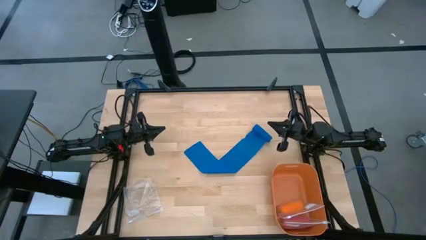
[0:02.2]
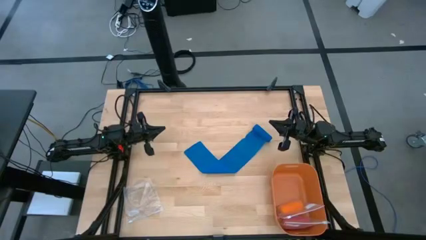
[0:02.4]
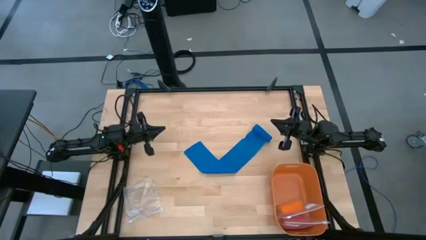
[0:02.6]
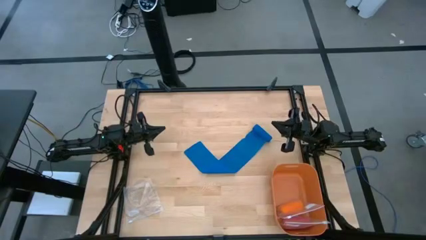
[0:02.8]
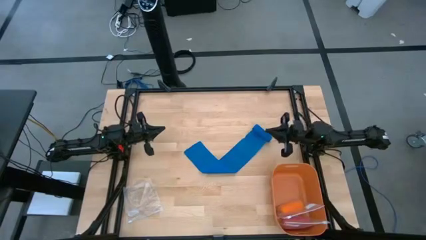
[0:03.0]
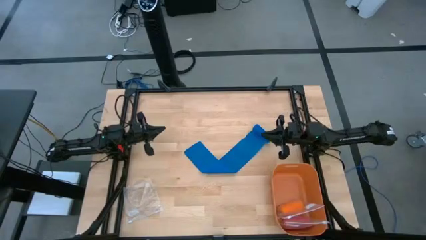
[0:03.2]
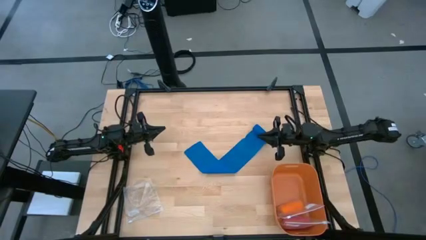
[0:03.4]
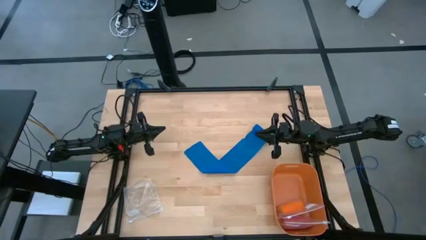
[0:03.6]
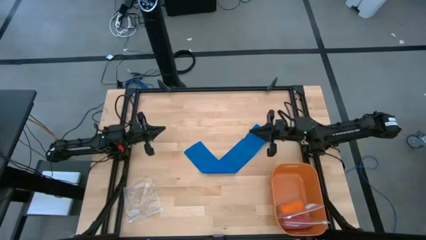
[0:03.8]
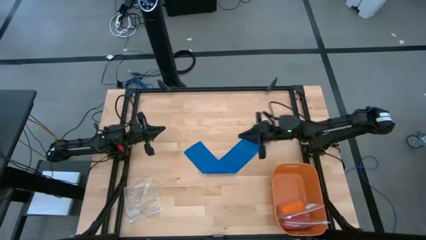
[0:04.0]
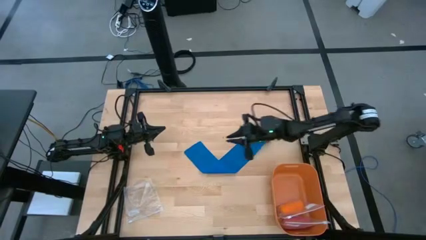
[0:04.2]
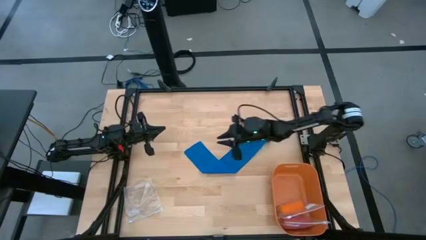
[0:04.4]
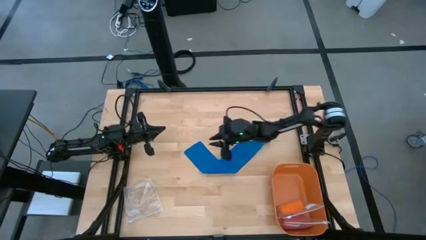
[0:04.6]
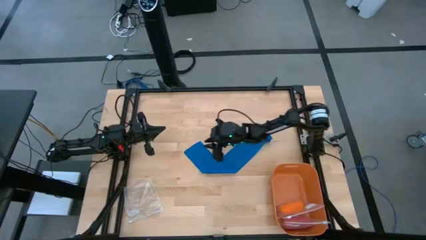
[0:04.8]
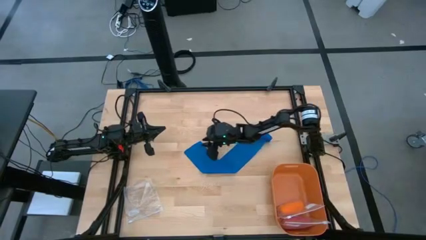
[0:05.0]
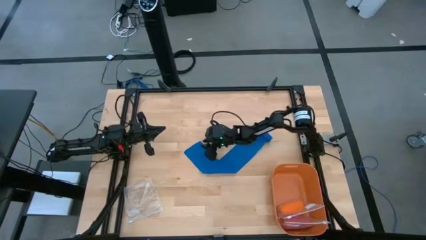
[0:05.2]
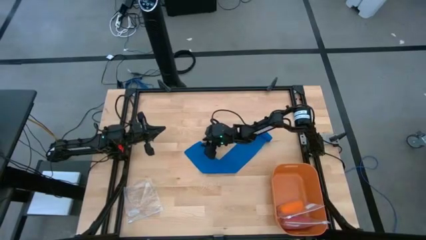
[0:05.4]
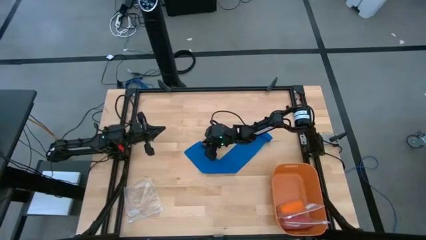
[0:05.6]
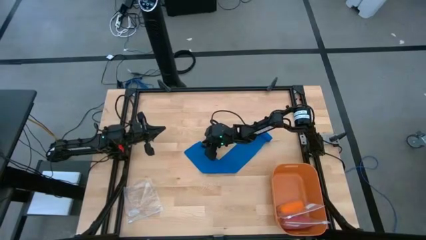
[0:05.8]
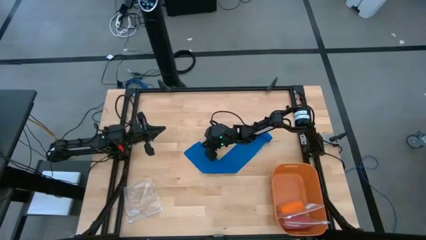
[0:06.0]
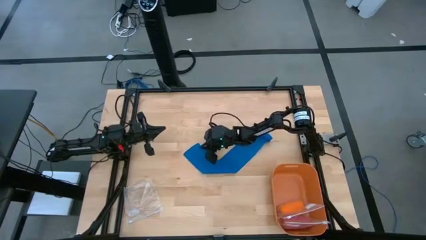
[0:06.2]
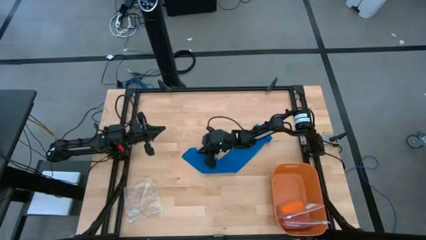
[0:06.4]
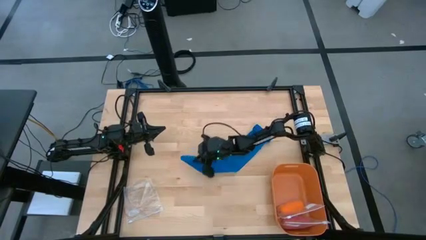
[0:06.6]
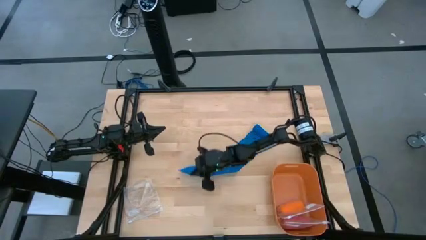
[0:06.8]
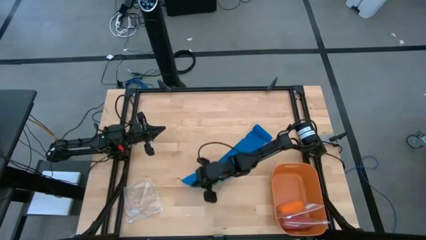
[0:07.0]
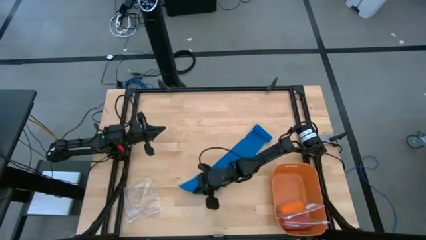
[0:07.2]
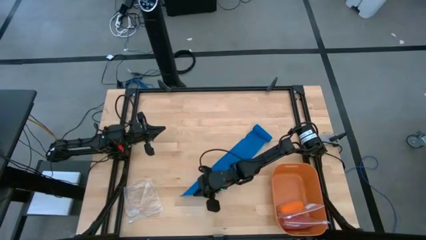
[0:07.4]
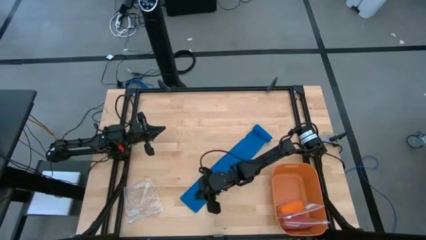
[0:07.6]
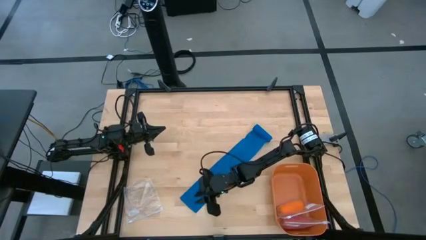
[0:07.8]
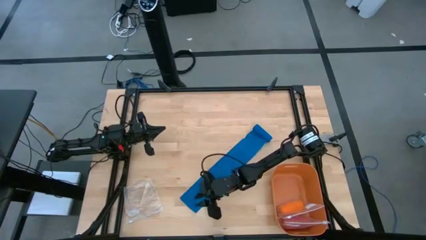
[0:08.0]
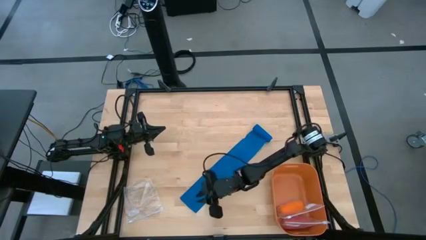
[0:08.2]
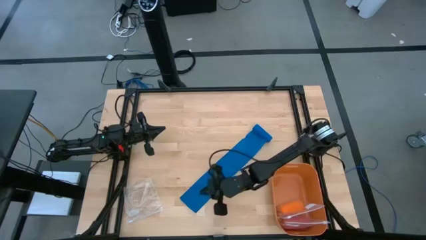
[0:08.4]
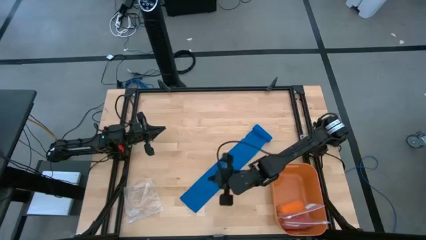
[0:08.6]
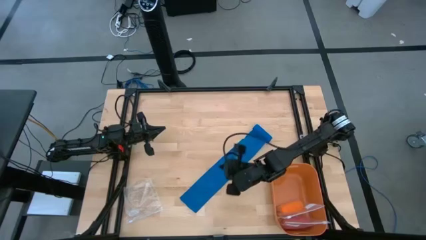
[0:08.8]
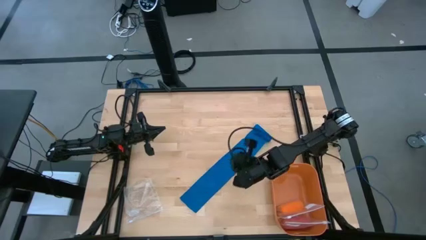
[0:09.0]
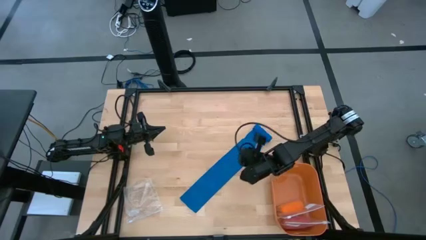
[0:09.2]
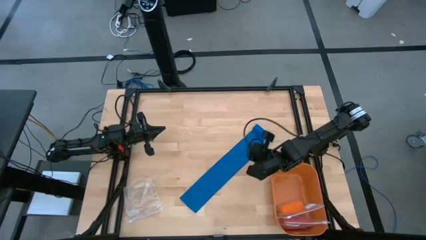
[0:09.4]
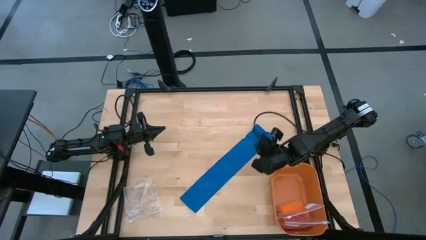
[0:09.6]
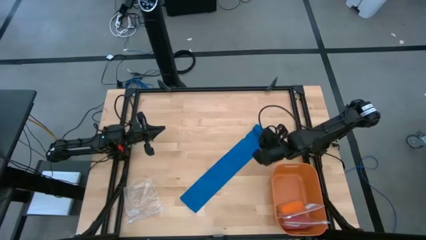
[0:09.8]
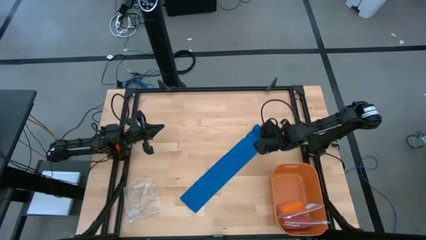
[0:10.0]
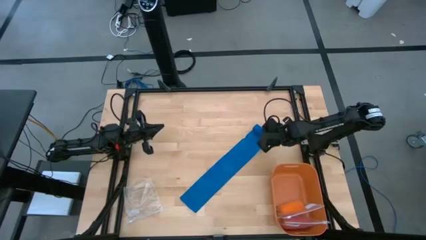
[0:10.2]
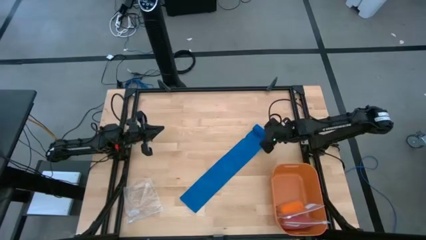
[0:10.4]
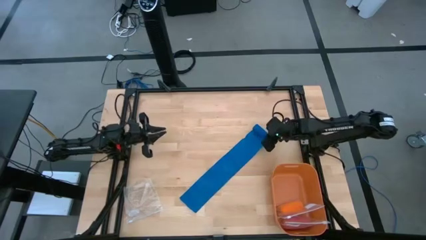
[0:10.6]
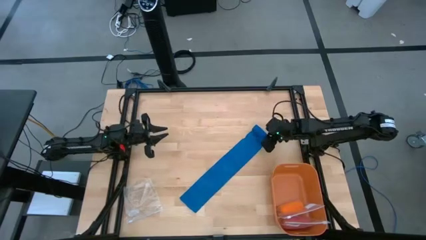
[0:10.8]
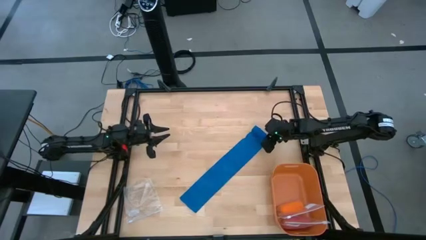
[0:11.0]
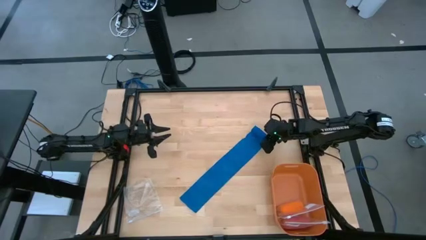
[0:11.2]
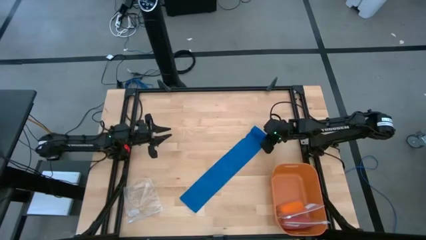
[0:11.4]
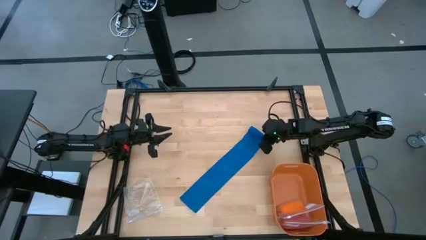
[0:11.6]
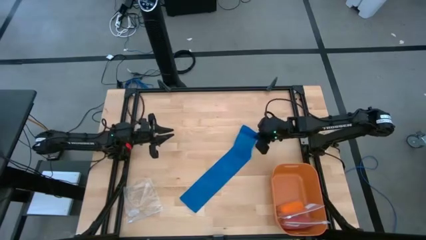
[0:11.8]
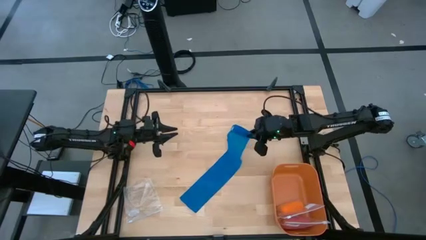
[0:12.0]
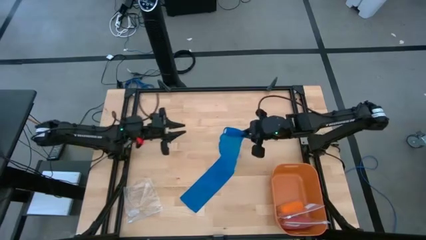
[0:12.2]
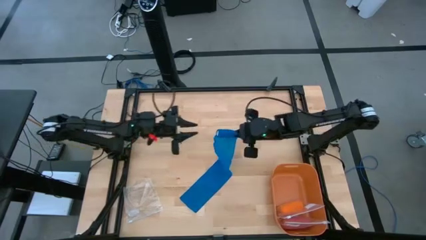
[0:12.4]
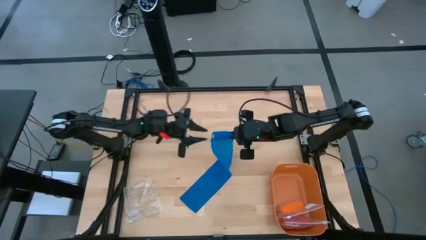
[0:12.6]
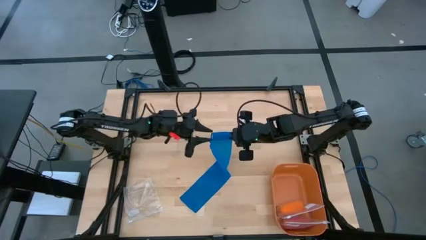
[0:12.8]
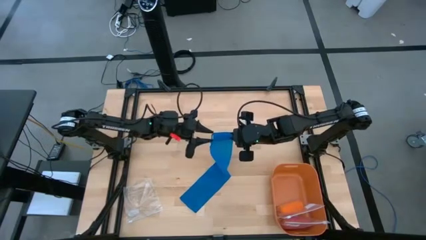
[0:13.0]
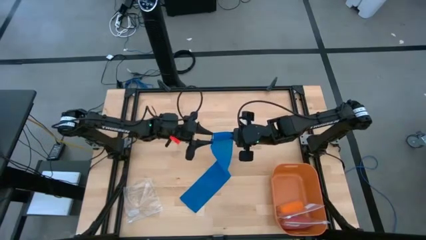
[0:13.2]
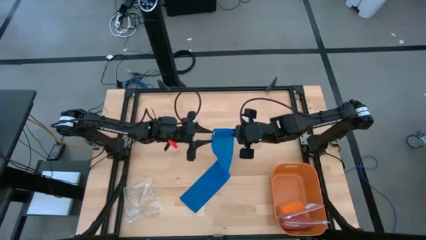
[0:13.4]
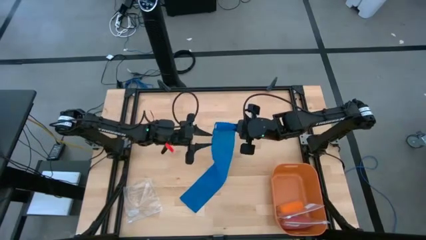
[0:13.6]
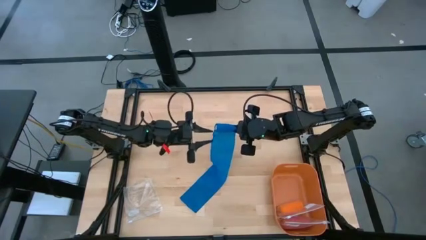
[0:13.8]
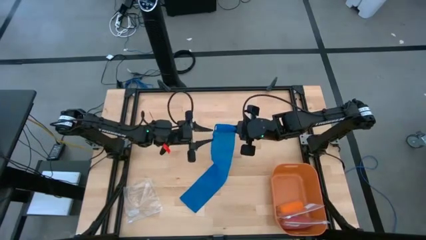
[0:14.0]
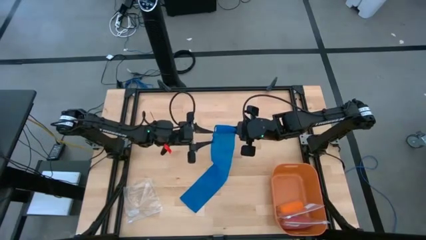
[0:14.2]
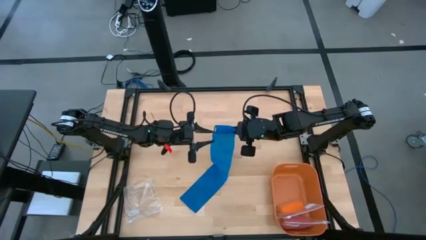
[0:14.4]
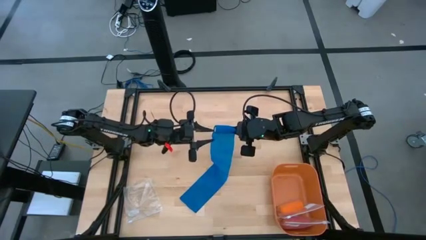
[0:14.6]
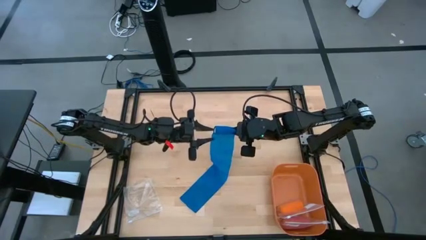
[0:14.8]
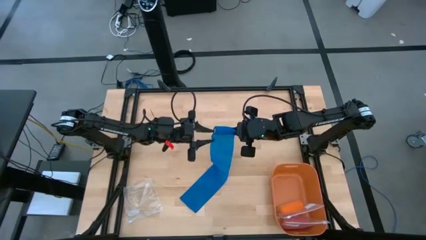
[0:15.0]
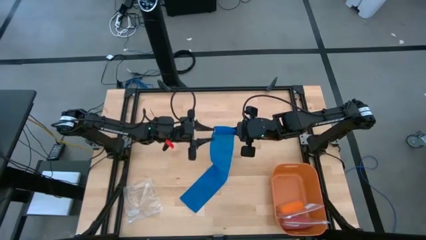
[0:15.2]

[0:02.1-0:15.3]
Task: Roll bandage
Roll the blue bandage
